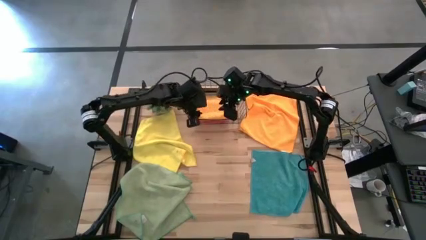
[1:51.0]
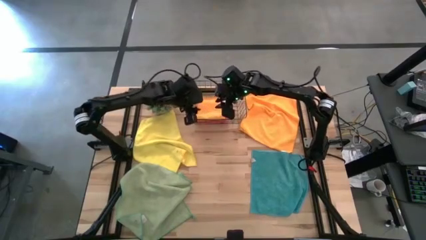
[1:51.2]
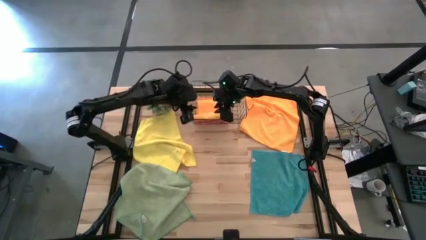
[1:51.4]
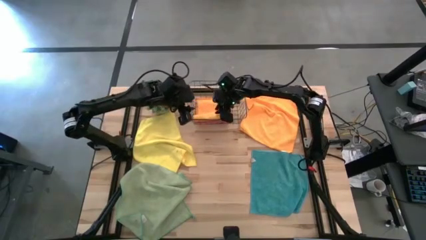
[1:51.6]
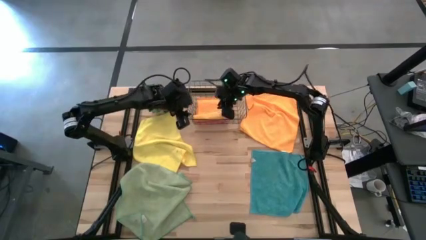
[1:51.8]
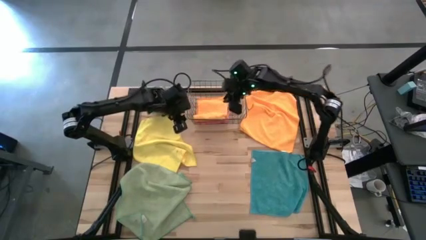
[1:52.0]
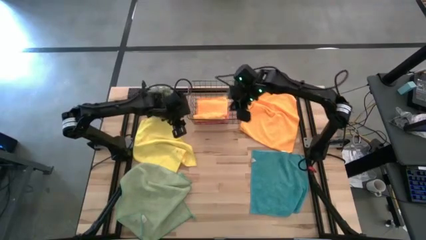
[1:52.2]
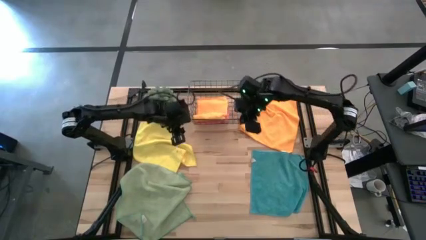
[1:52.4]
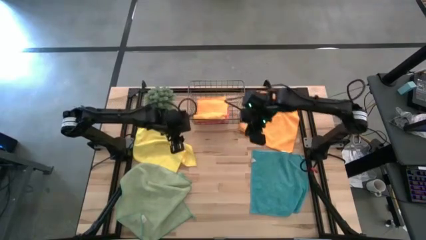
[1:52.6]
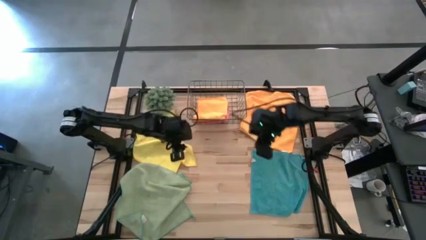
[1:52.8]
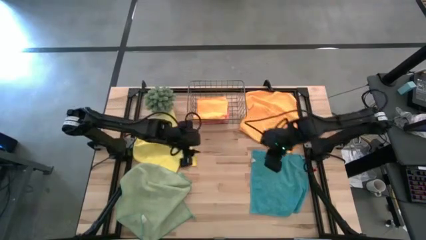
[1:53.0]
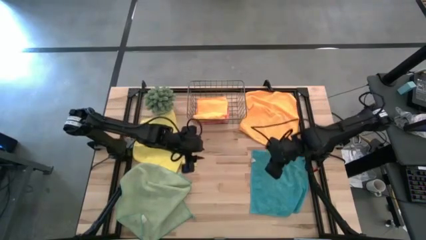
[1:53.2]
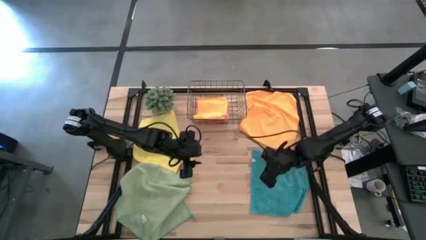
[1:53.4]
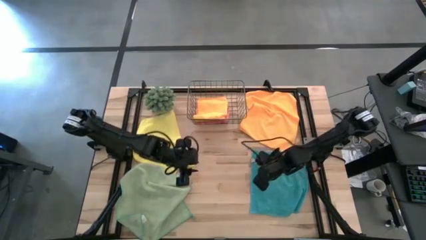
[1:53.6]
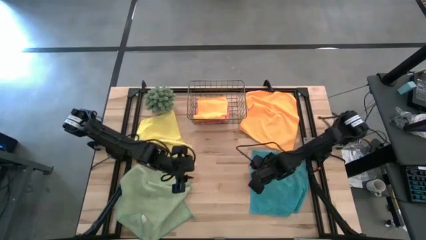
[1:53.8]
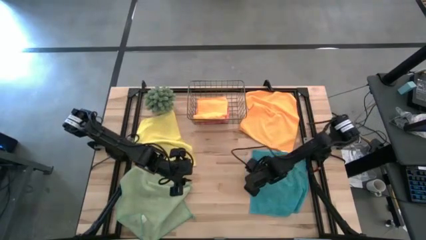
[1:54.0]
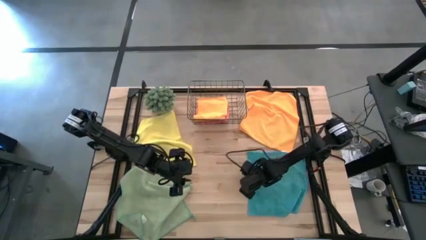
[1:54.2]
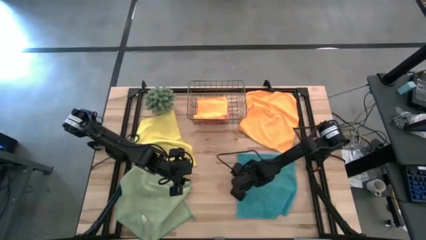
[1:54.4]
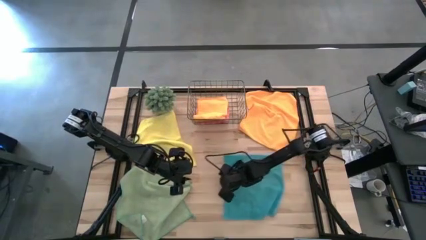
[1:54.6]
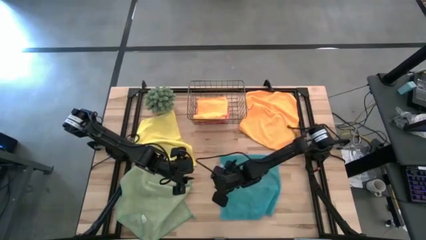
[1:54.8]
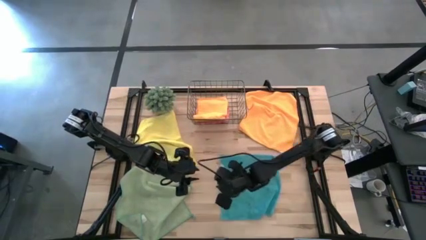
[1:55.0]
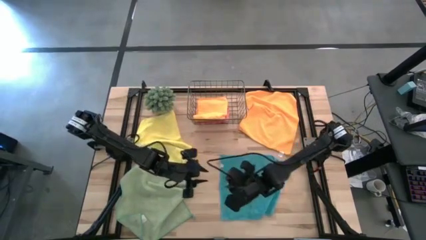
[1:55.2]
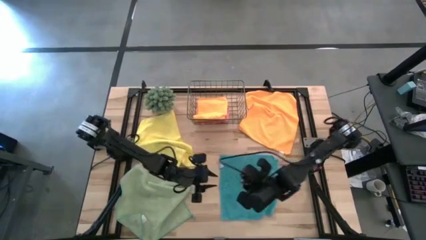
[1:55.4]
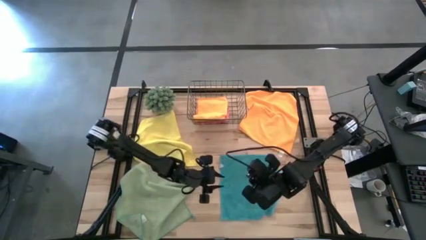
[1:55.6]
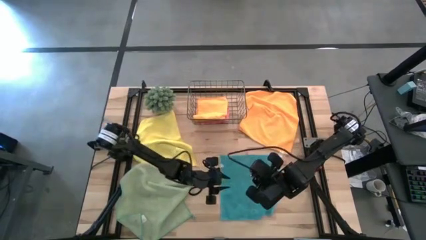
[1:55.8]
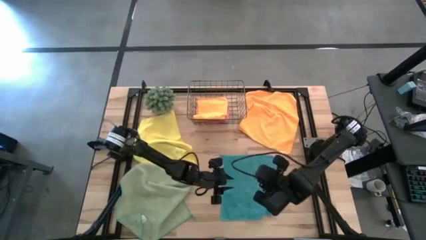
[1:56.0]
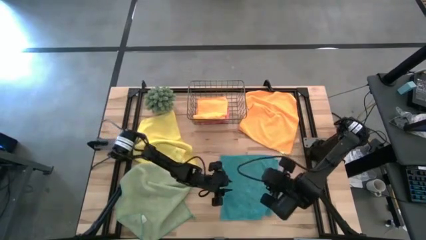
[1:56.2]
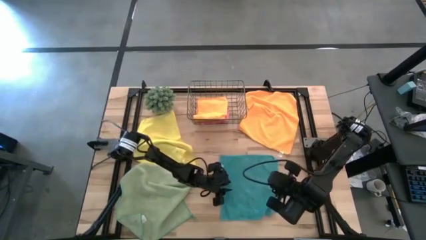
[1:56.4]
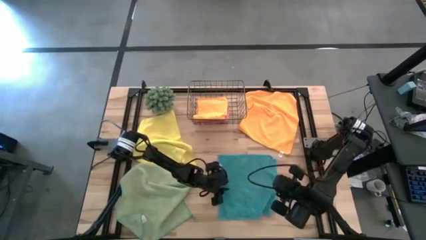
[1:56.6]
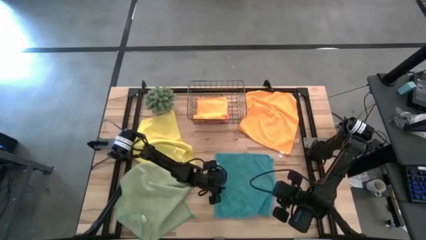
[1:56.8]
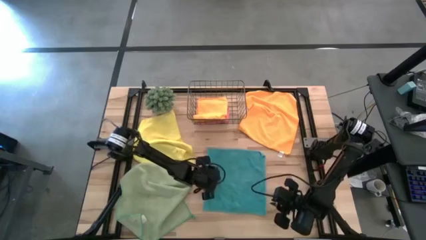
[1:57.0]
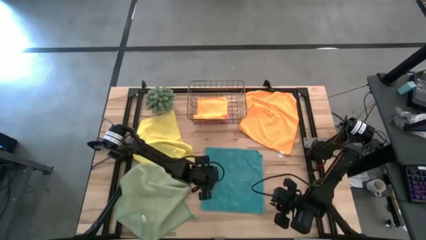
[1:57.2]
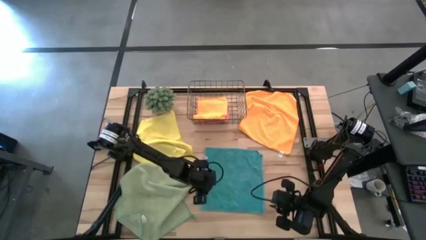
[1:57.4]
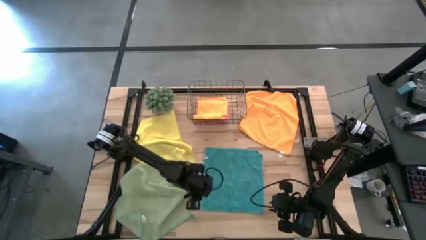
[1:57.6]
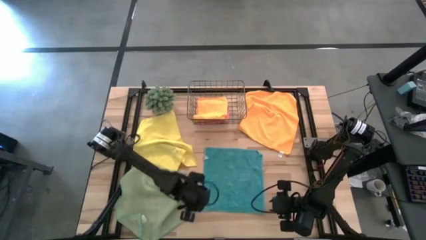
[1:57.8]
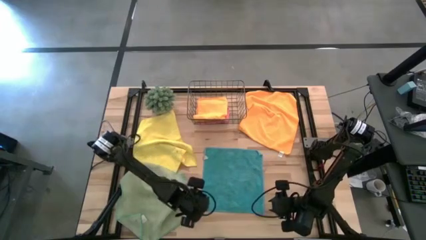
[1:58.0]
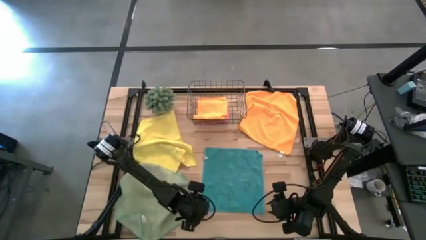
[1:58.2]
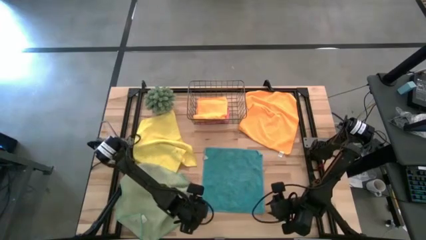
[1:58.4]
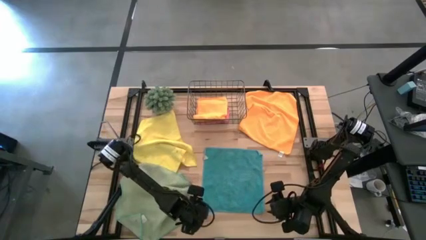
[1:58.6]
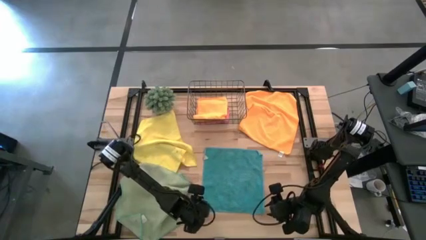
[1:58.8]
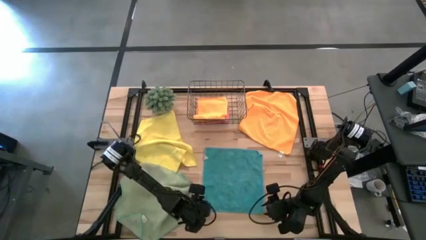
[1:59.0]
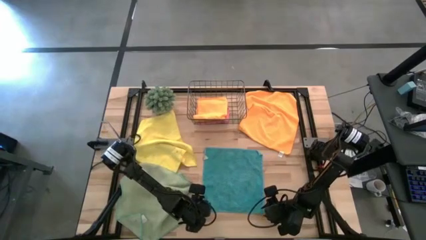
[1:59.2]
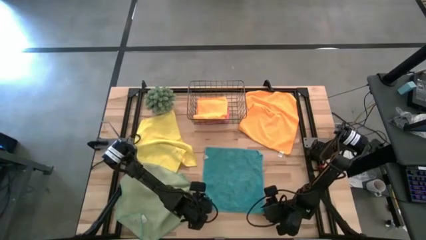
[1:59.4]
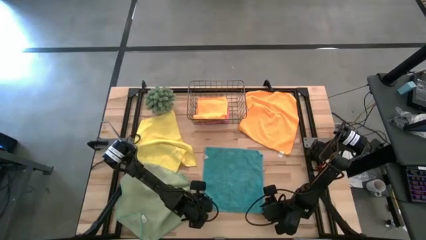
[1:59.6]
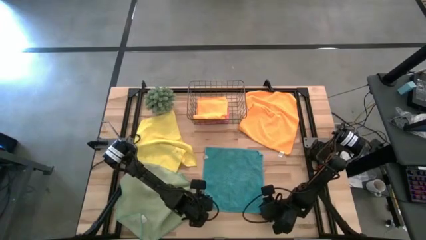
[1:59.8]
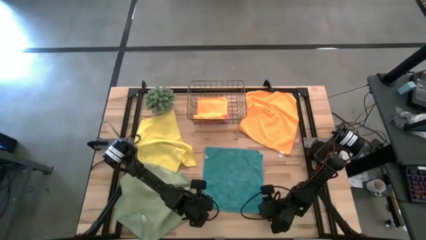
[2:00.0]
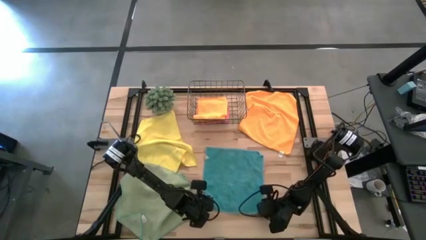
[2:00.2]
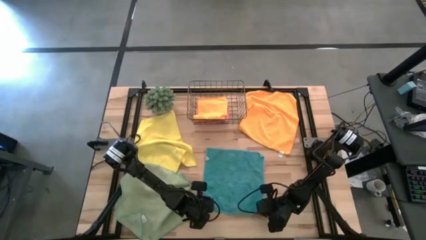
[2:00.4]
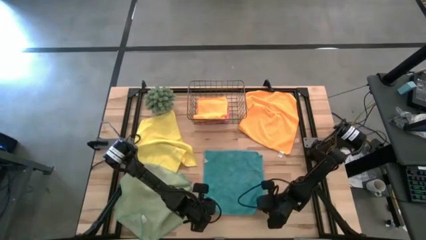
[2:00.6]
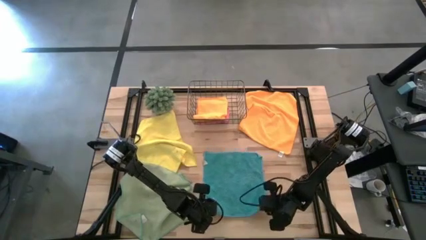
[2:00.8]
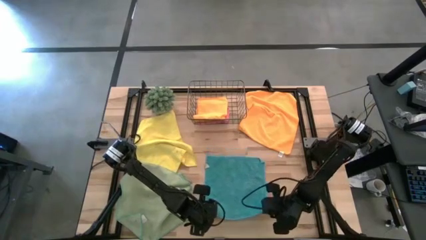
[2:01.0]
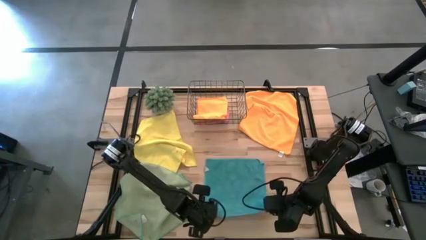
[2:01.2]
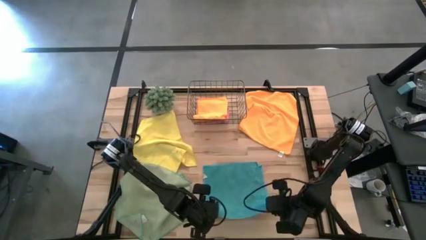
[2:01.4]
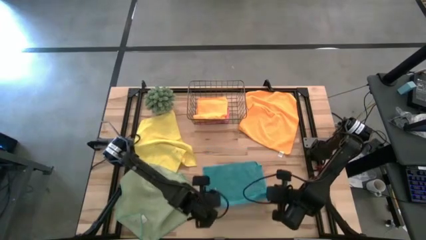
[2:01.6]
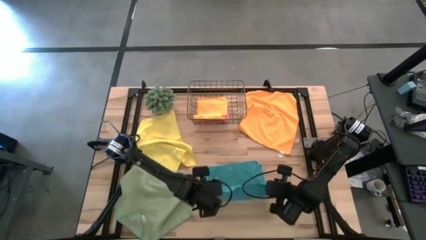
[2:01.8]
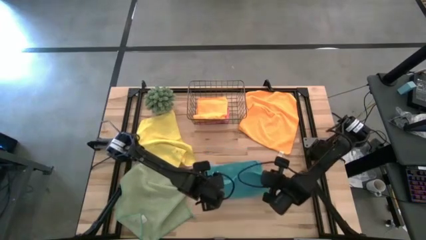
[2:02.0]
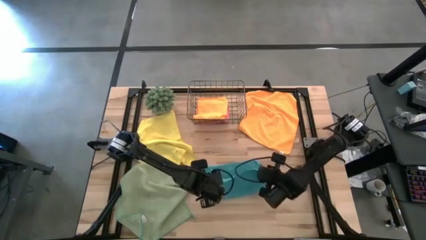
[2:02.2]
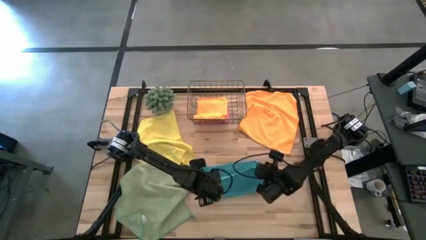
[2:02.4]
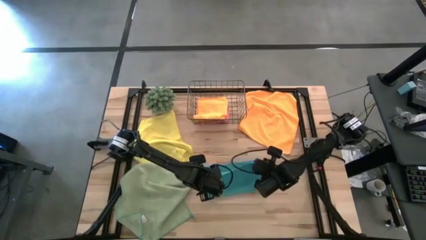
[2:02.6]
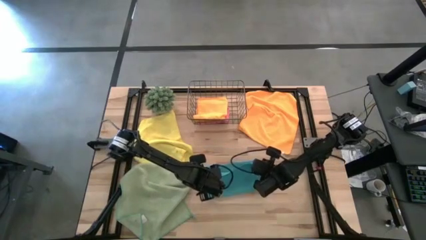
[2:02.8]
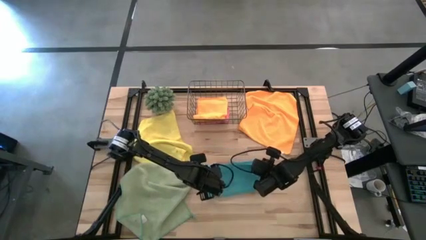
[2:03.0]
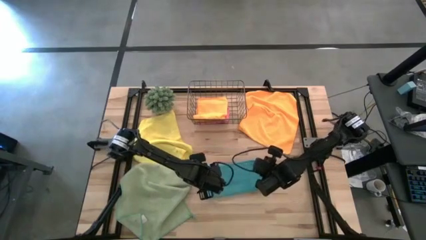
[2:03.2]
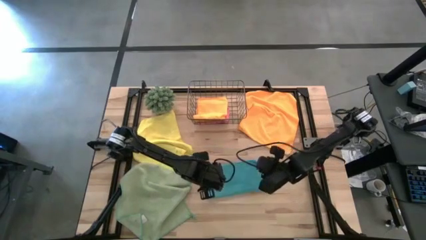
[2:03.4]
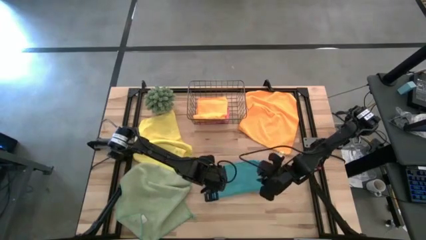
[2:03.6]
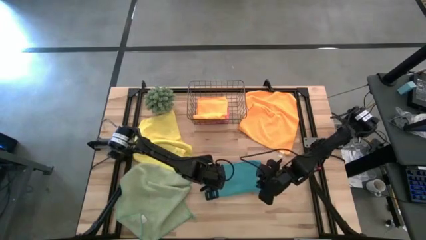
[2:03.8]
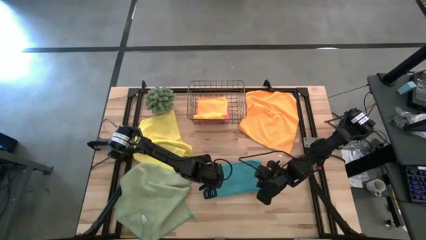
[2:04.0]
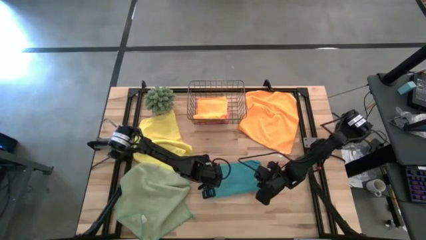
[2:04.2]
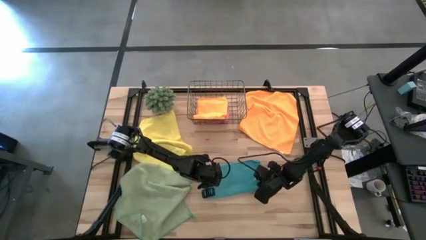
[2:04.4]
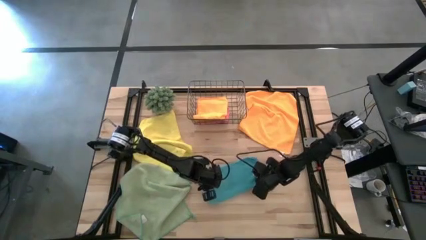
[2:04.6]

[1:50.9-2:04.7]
Task: Fold microfiber towels
Fold the blue microfiber towel
